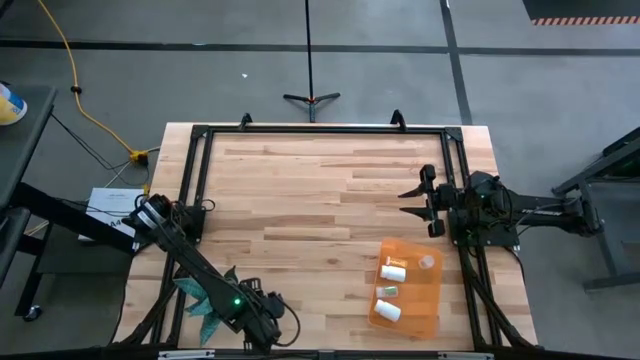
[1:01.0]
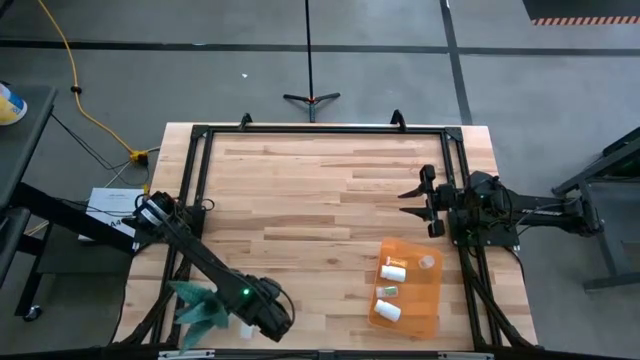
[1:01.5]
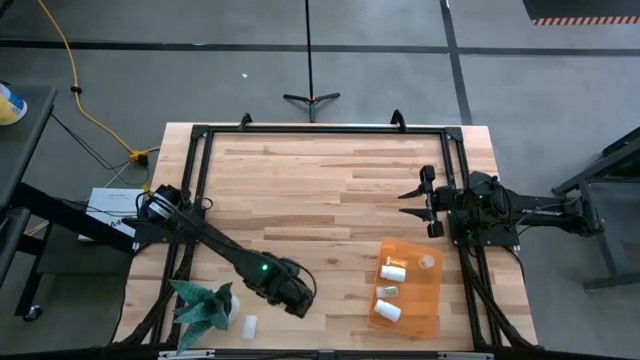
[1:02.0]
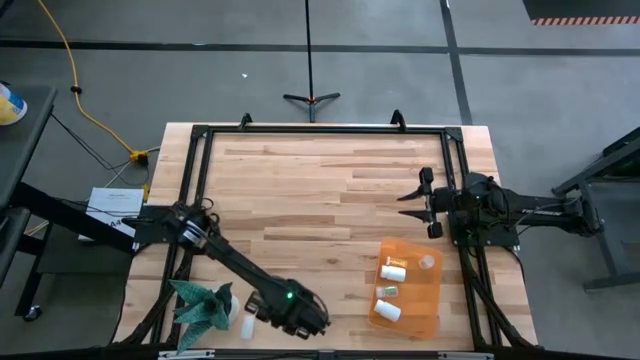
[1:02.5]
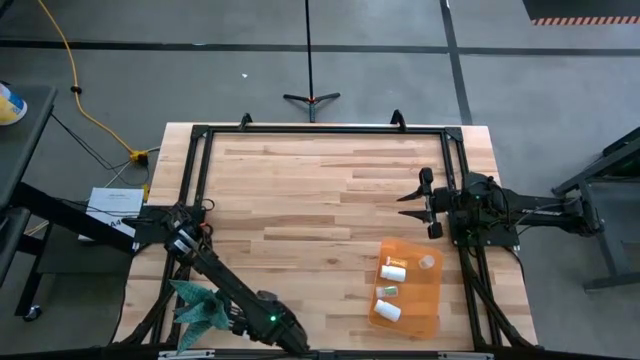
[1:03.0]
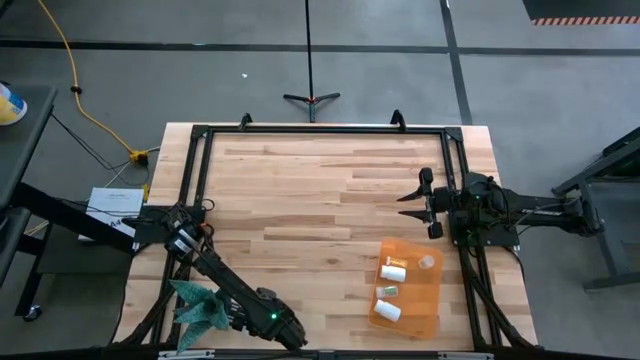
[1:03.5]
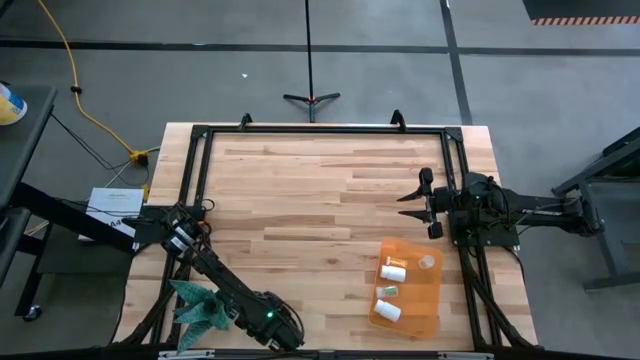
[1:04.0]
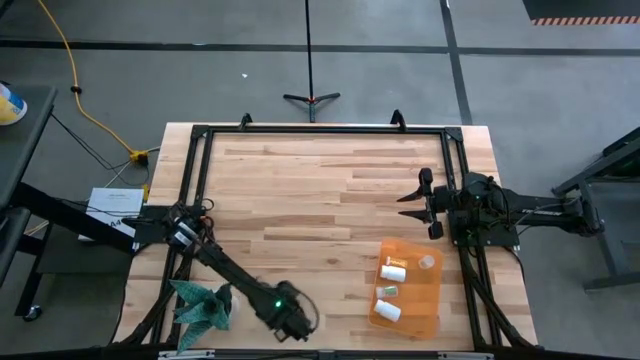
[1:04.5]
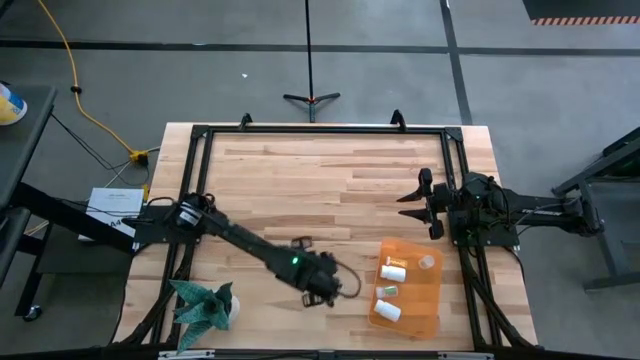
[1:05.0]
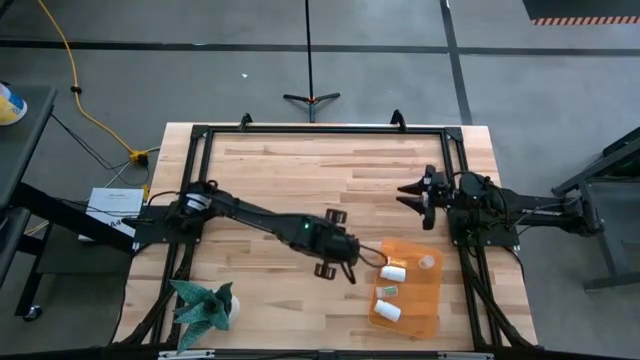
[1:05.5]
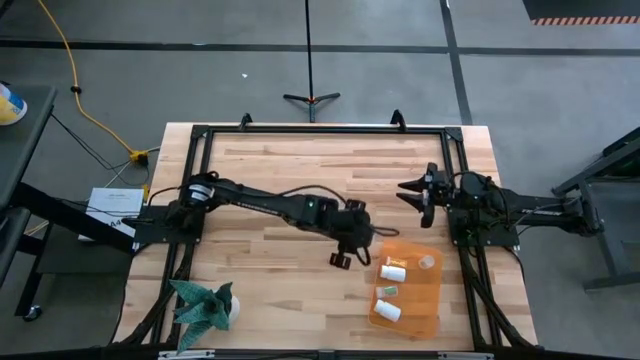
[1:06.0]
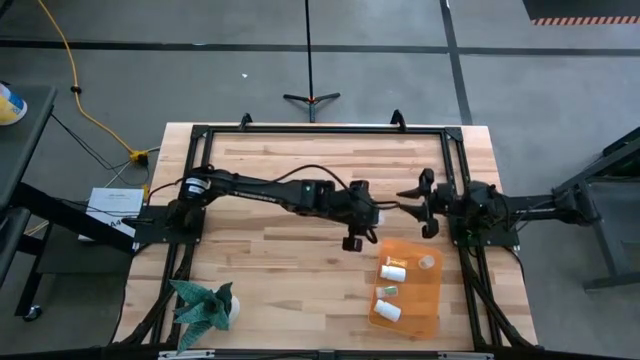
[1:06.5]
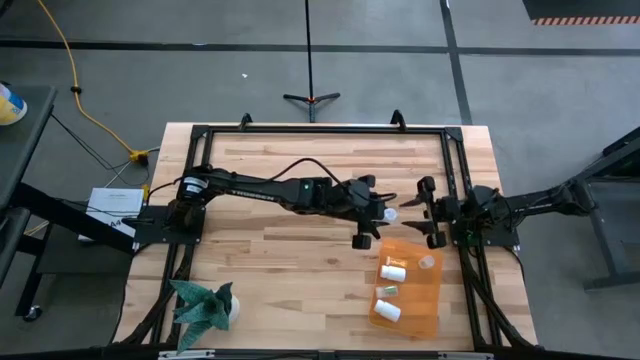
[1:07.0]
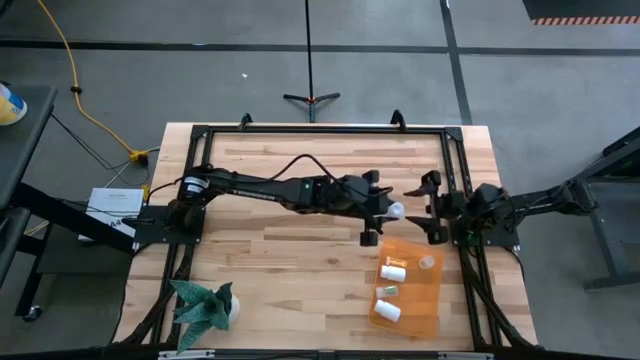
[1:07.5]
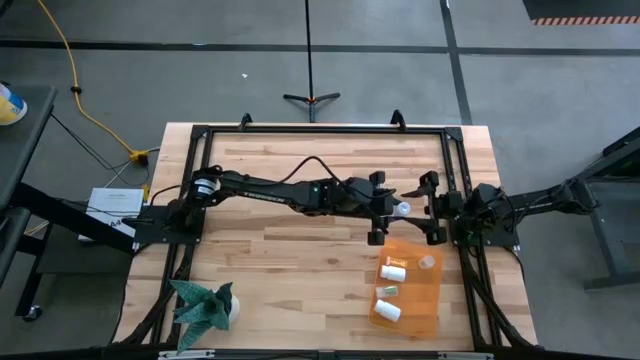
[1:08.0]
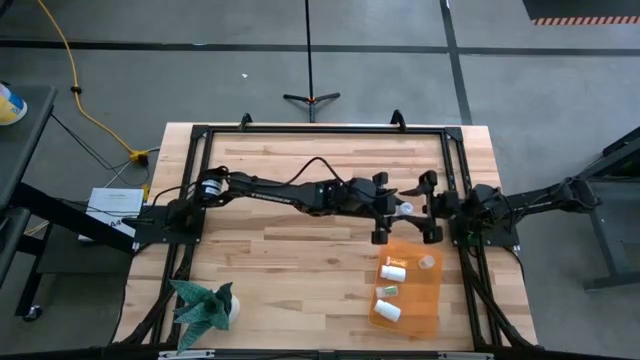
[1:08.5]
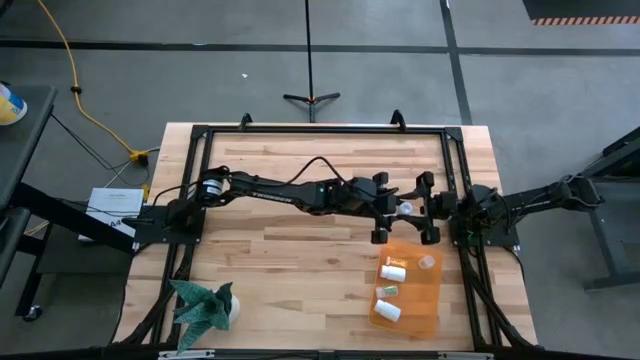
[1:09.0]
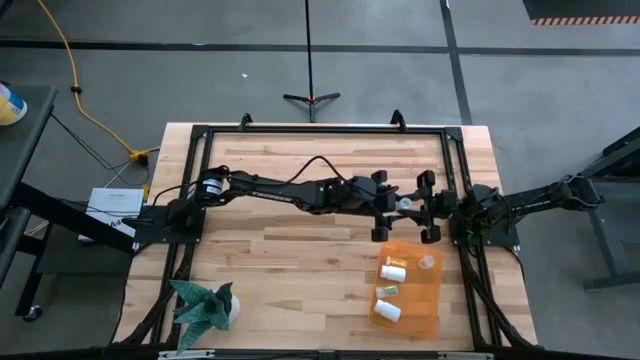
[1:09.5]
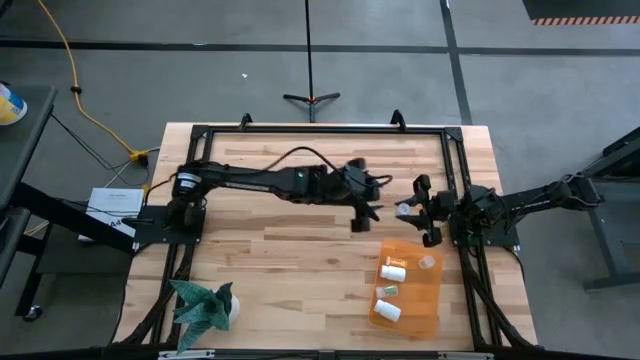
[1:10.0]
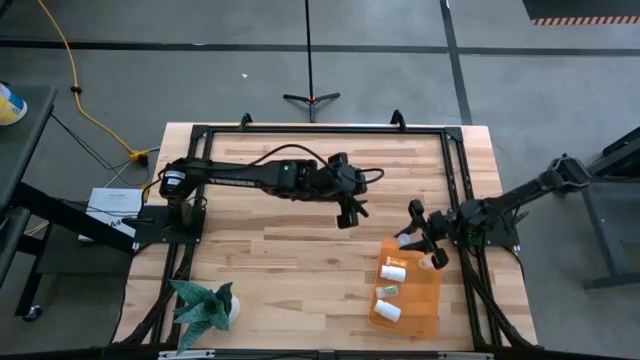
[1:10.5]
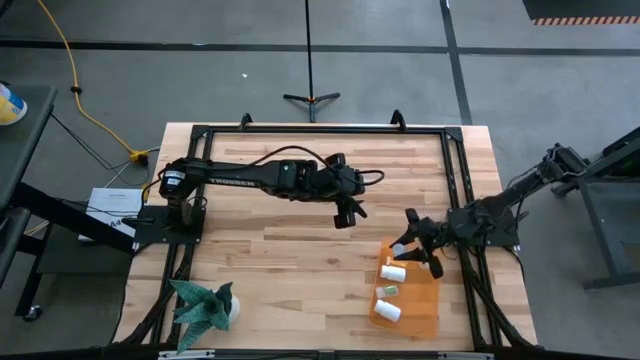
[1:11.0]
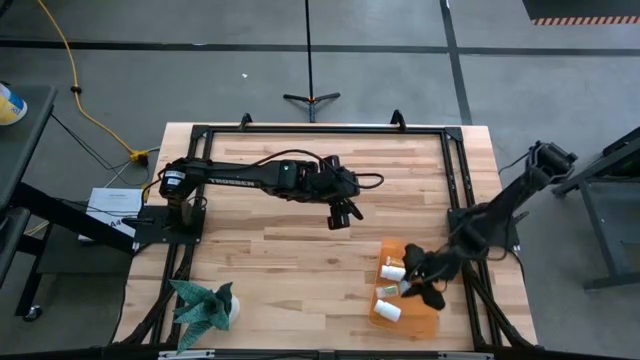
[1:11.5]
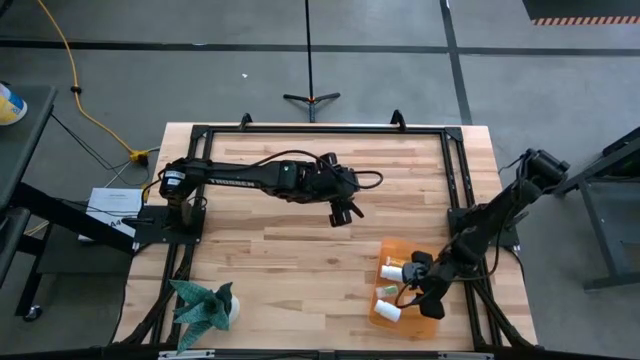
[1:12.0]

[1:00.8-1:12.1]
Task: Pick and place pill bottles into a basket
Put the transparent medicine bottle into the orange bin

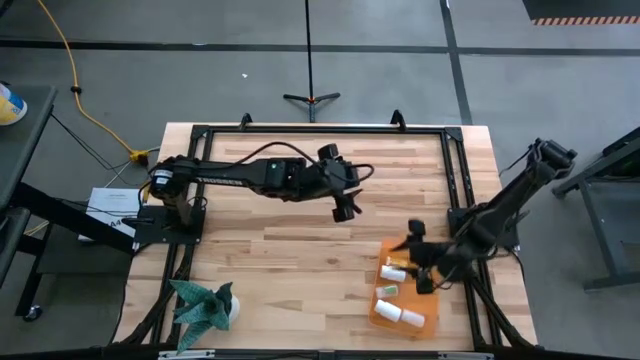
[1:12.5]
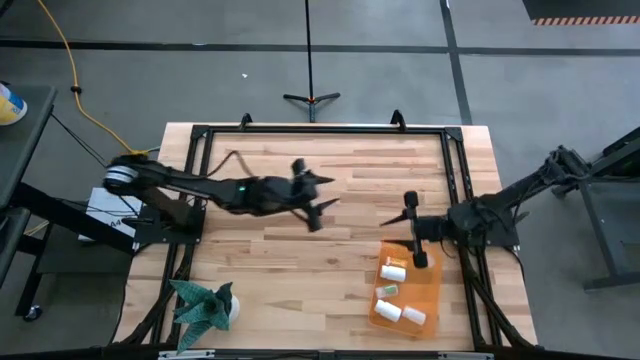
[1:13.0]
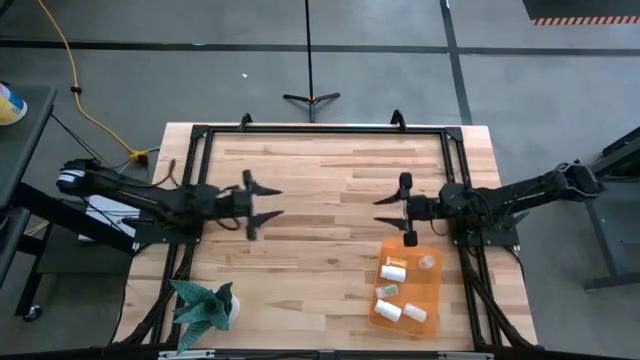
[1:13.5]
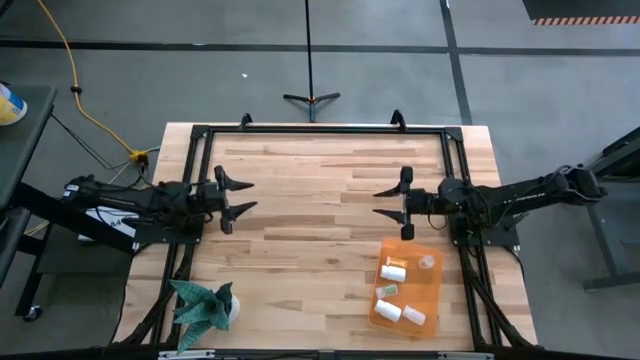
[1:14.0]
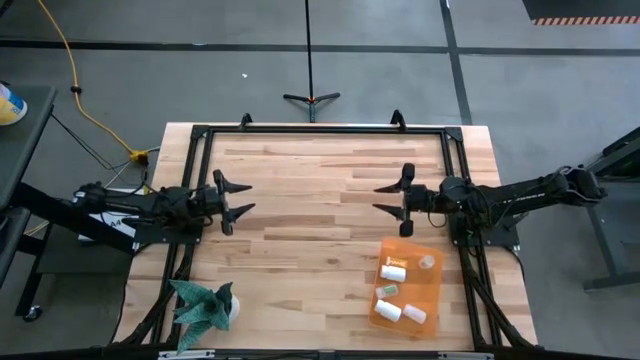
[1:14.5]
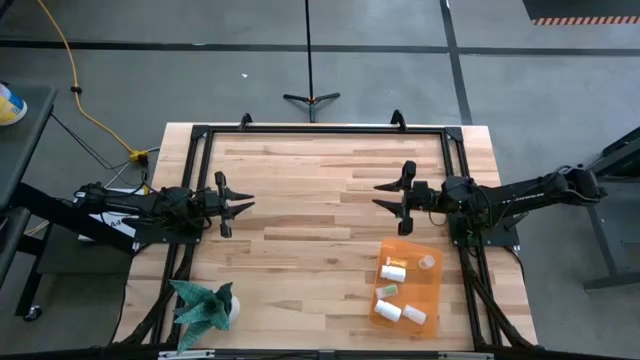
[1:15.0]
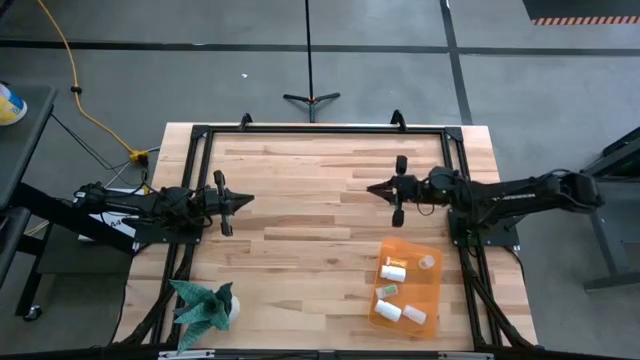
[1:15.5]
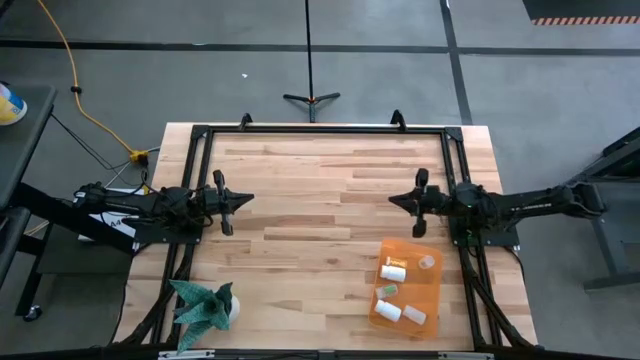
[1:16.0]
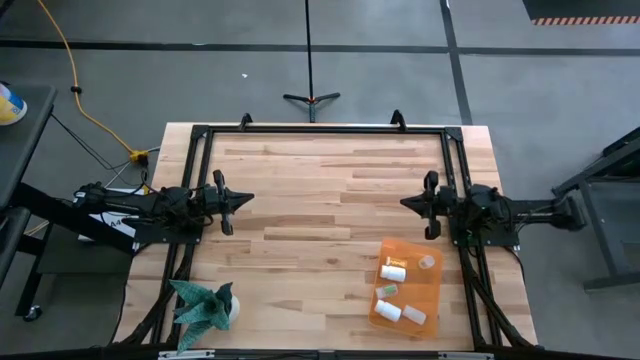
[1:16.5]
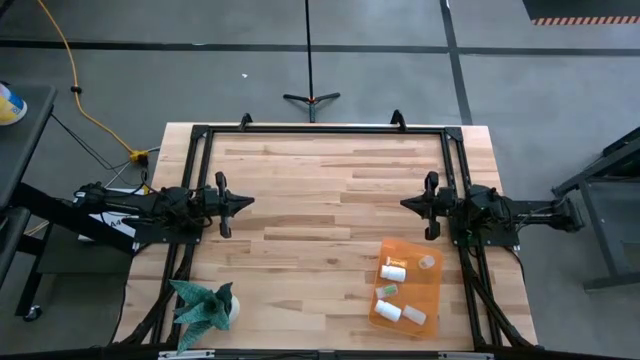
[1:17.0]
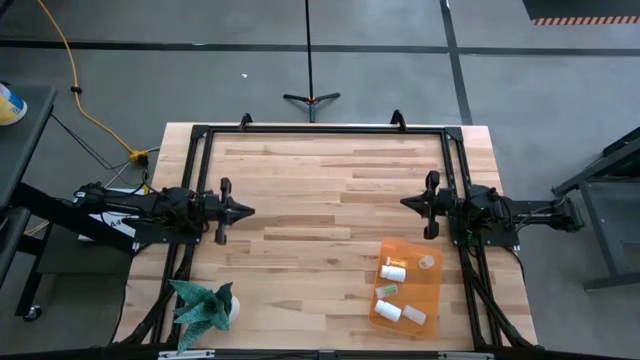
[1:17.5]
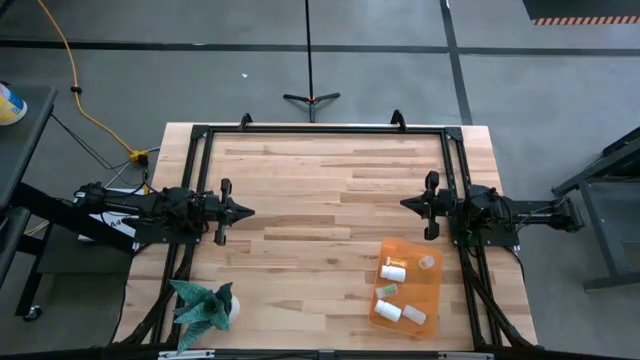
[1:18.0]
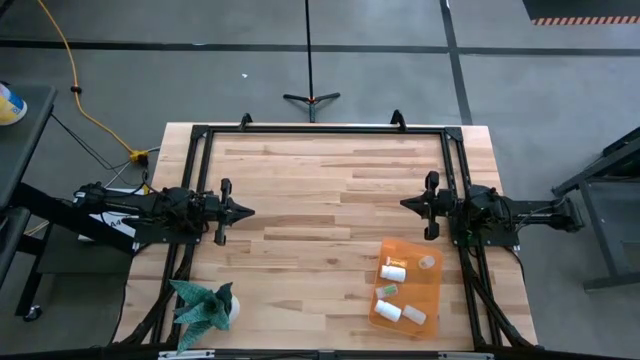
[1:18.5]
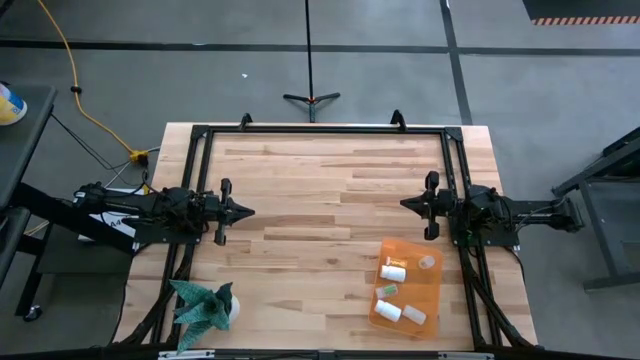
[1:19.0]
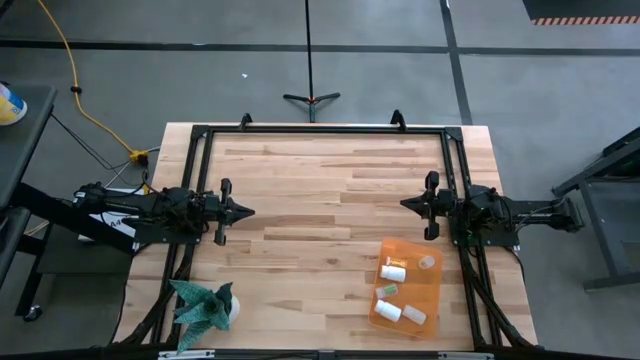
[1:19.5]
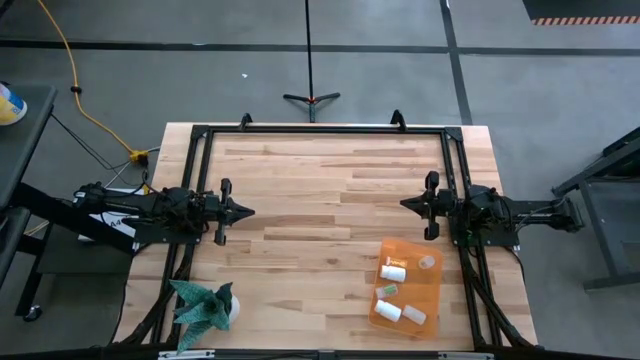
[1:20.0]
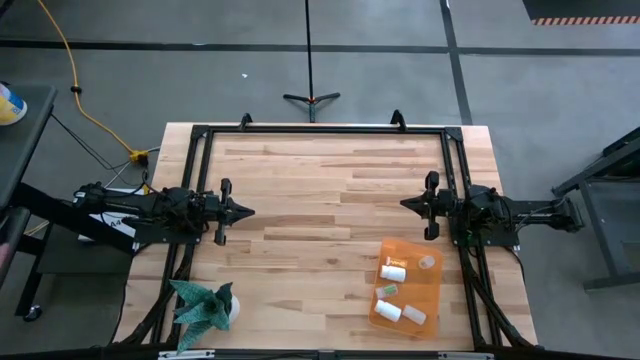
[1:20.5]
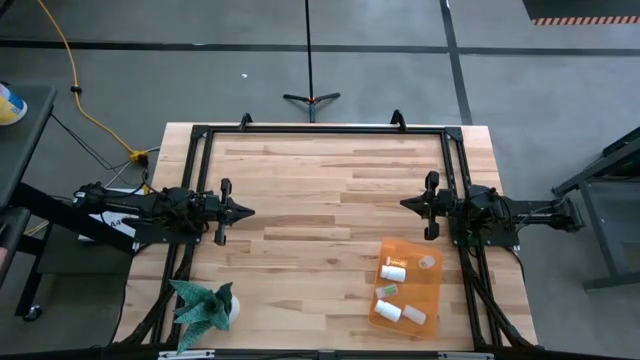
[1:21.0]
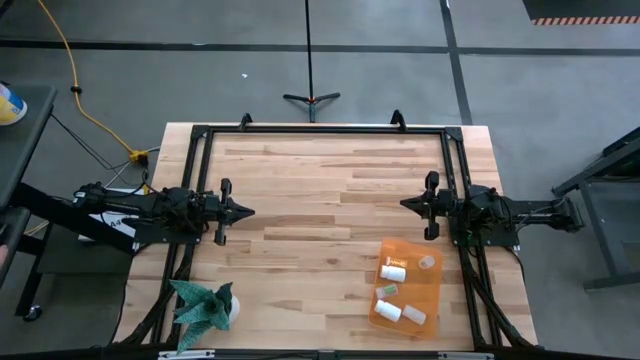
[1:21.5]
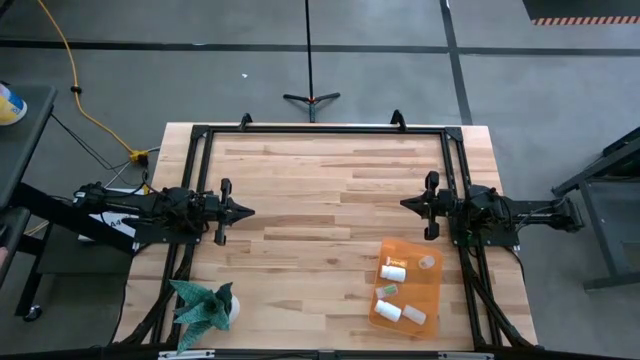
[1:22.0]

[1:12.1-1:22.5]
Return to Home Position
